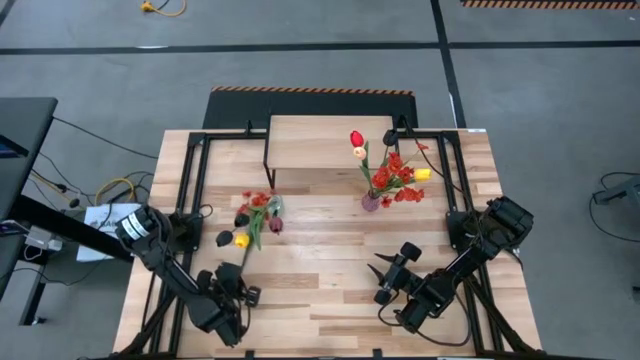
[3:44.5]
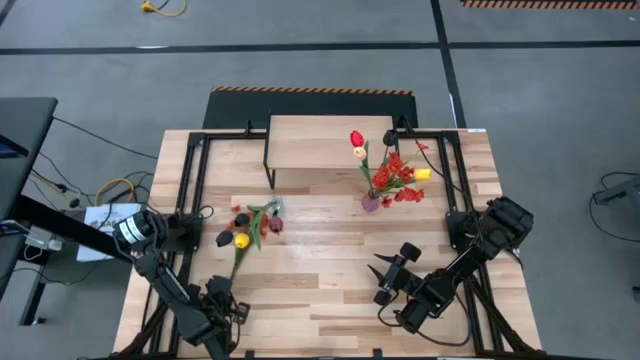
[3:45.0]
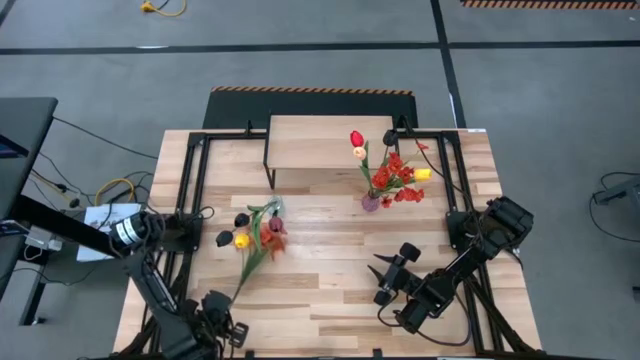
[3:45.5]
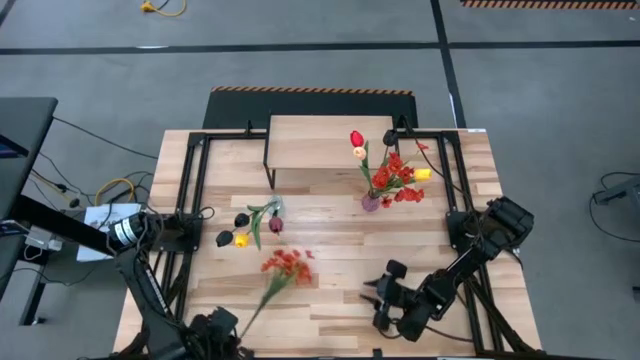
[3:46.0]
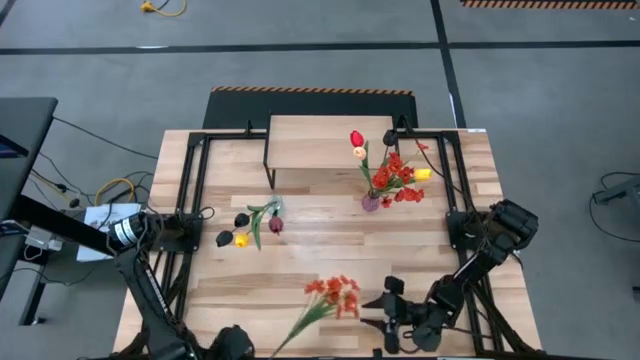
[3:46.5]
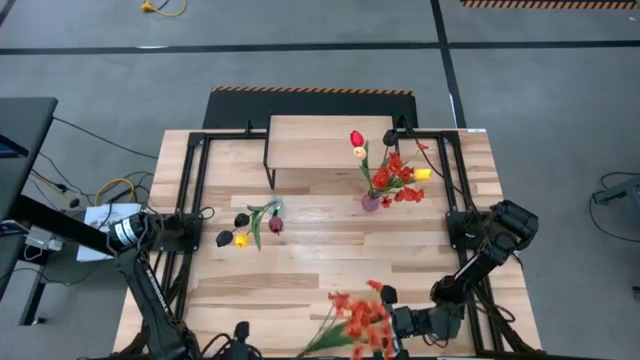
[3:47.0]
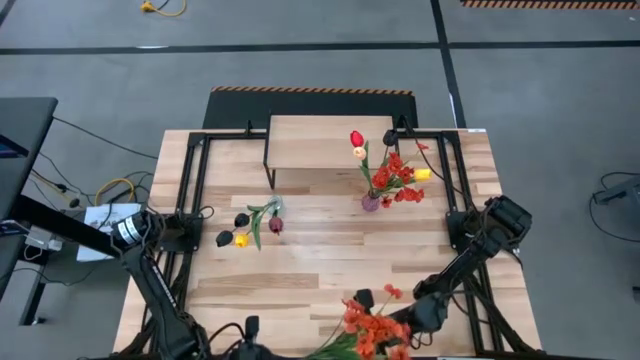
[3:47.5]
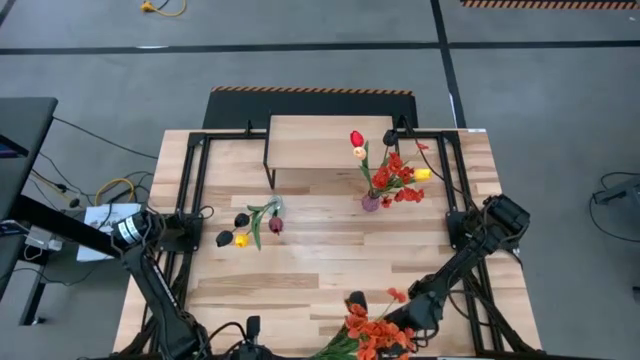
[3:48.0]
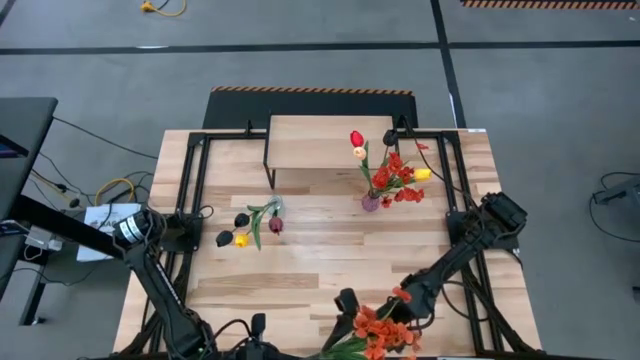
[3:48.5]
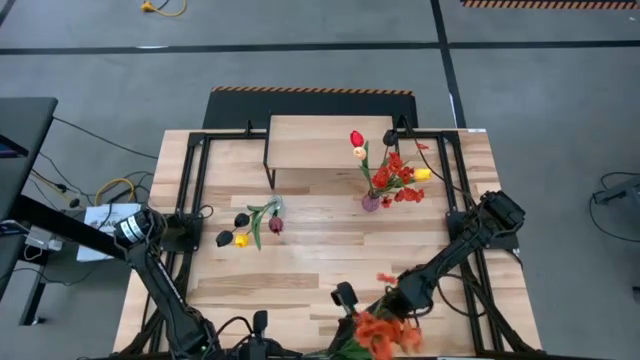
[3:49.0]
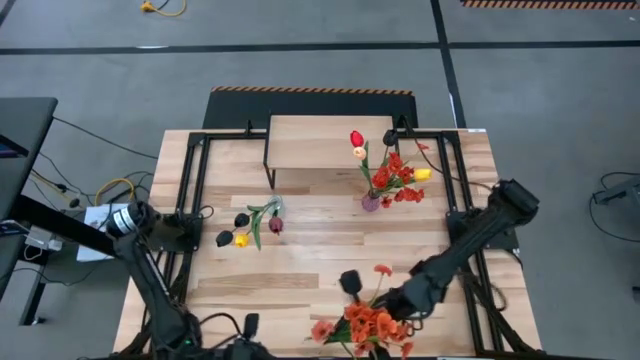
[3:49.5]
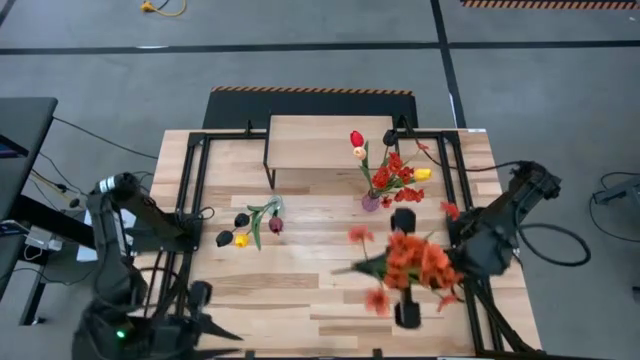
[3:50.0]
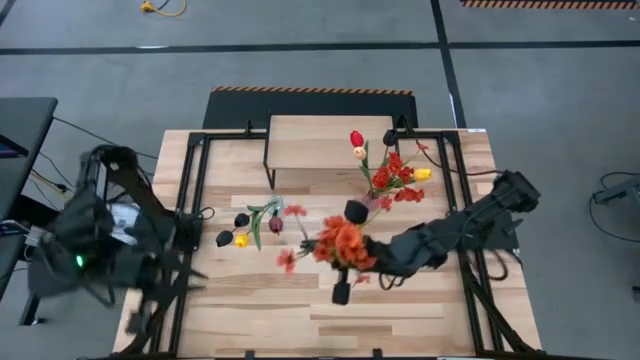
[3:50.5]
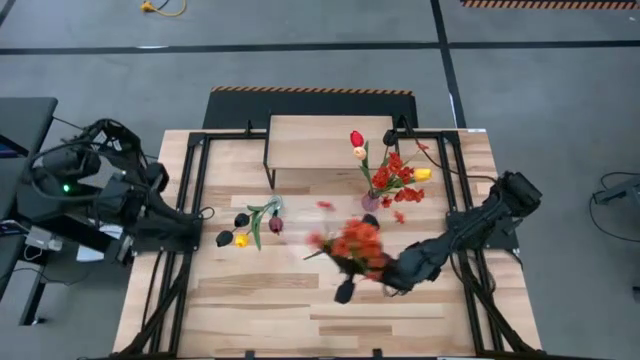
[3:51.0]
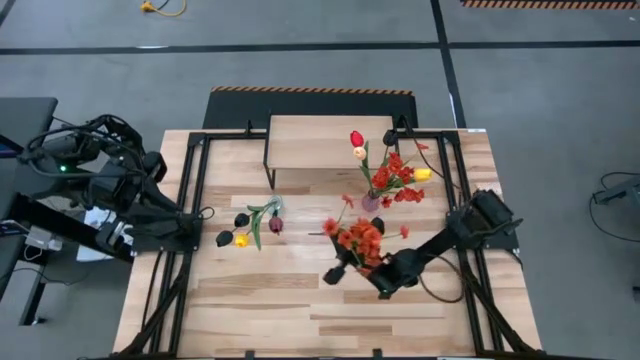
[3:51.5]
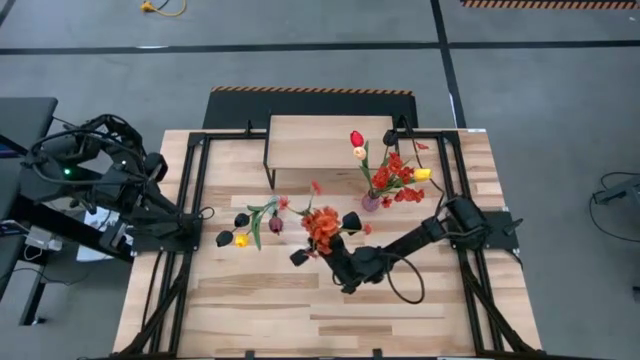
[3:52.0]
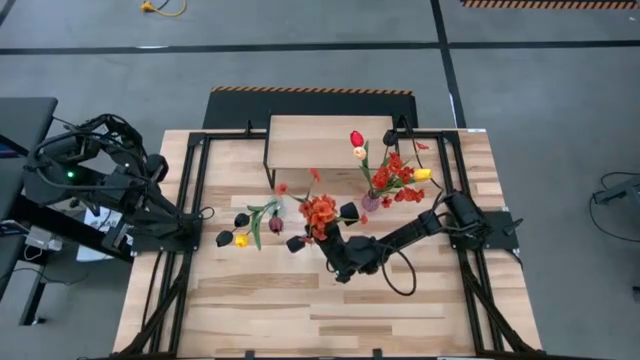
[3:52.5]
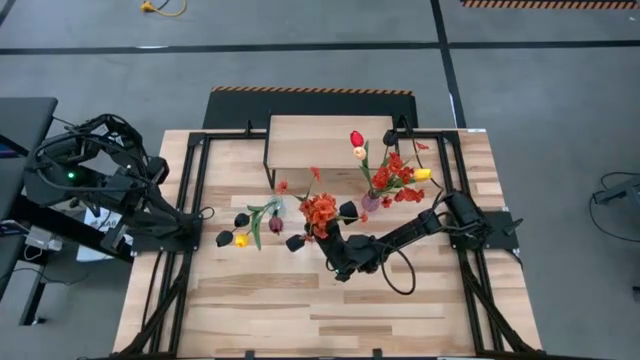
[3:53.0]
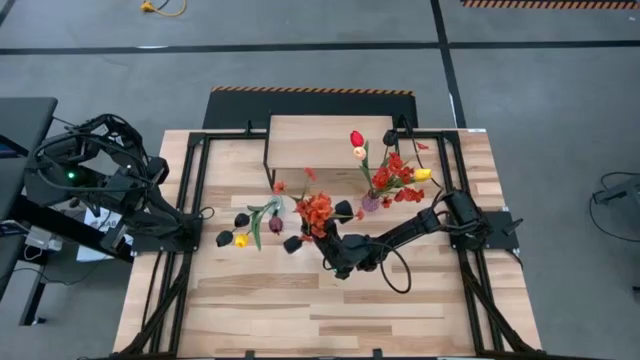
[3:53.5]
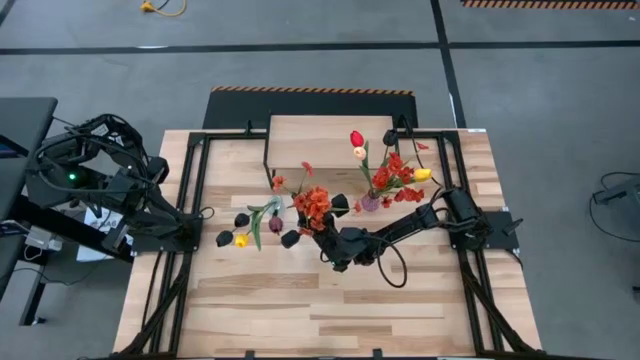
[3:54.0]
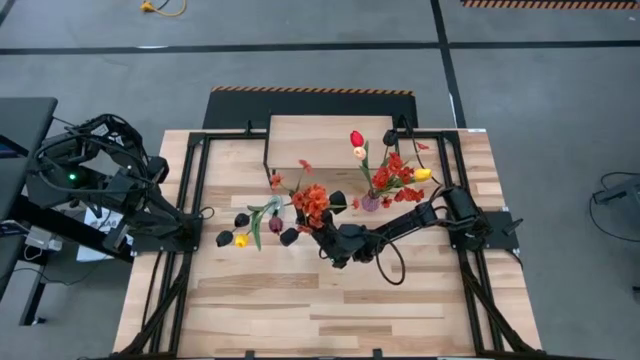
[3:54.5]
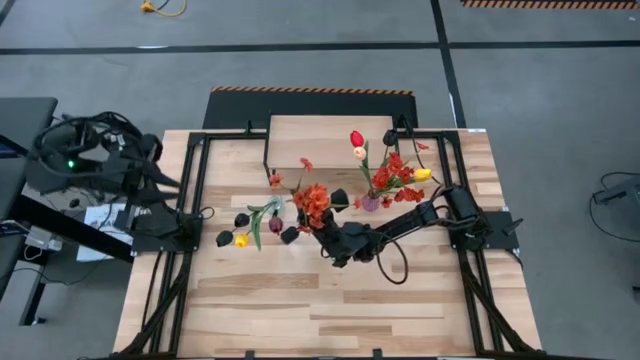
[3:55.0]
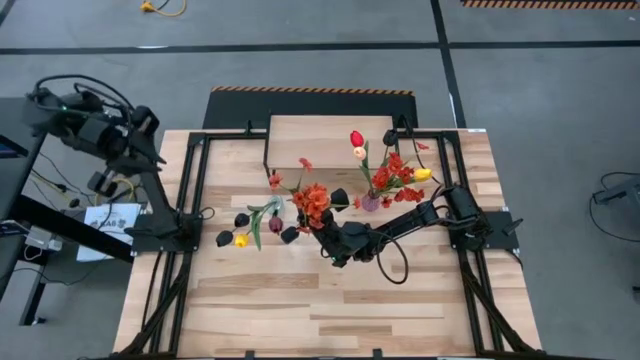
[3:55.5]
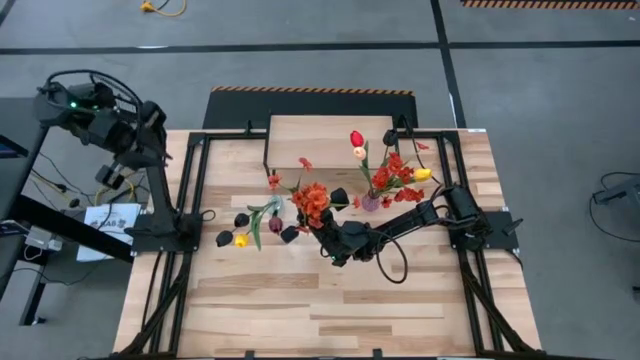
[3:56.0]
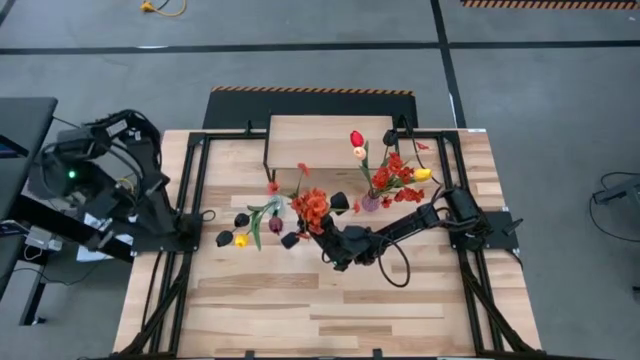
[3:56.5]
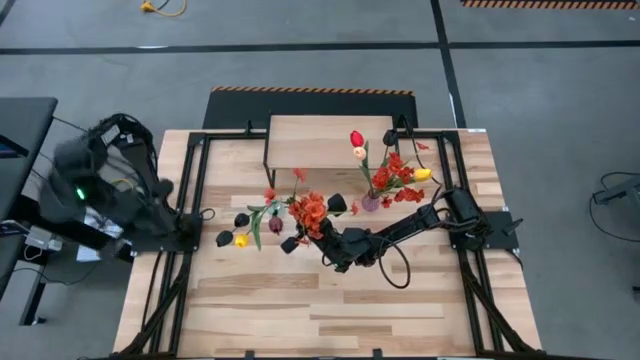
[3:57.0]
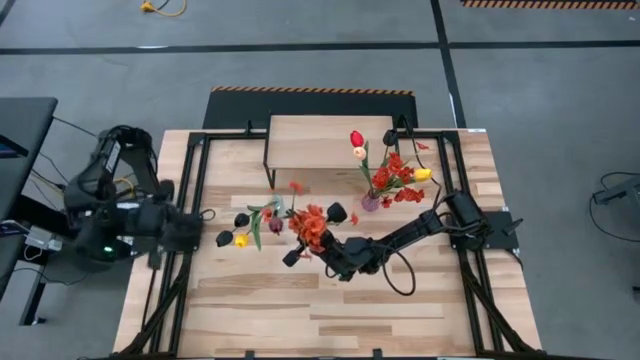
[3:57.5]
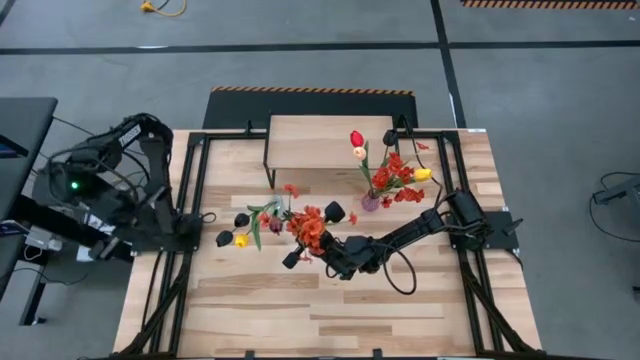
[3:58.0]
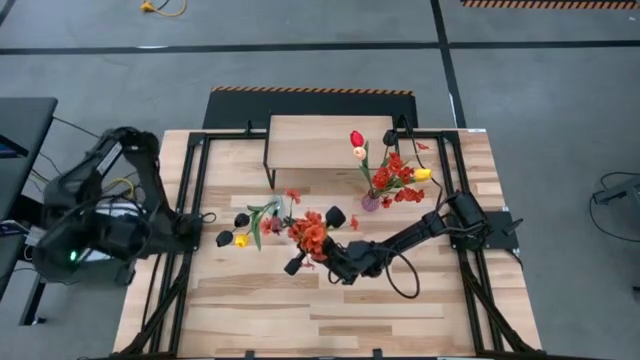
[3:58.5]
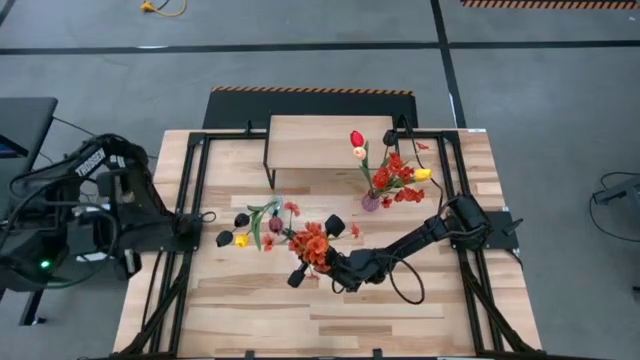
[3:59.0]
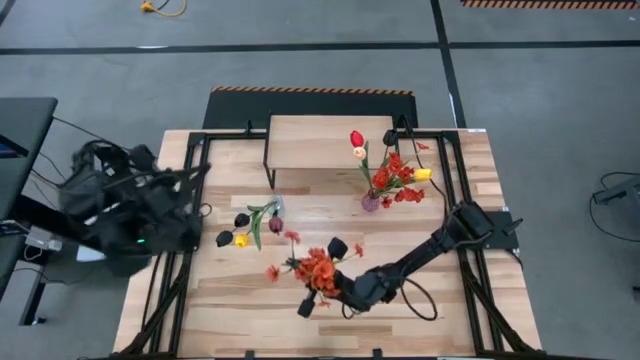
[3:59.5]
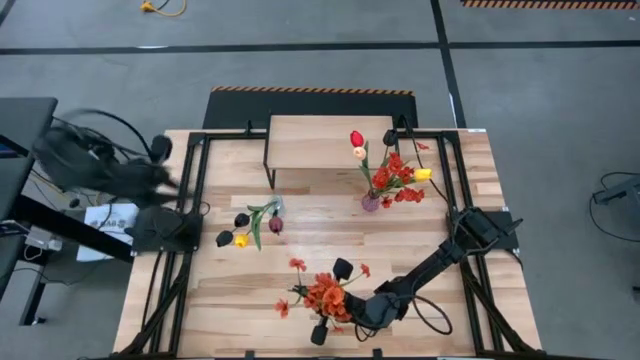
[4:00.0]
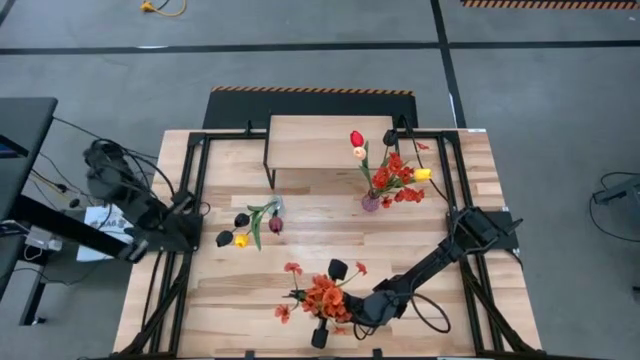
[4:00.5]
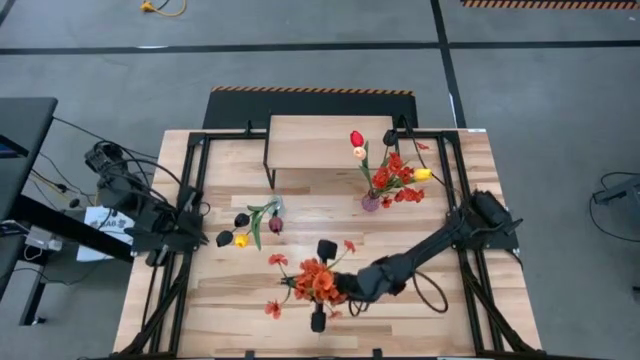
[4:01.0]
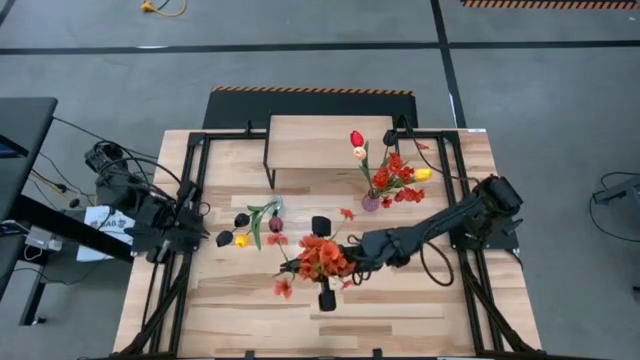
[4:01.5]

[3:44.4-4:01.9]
Task: Pick and place flowers into a vace then onto a shelf
Put the red flower into the transparent vase

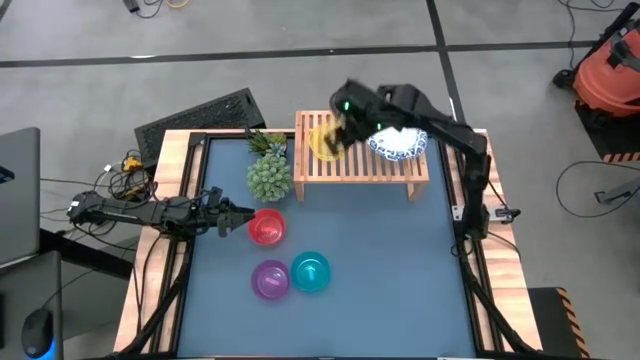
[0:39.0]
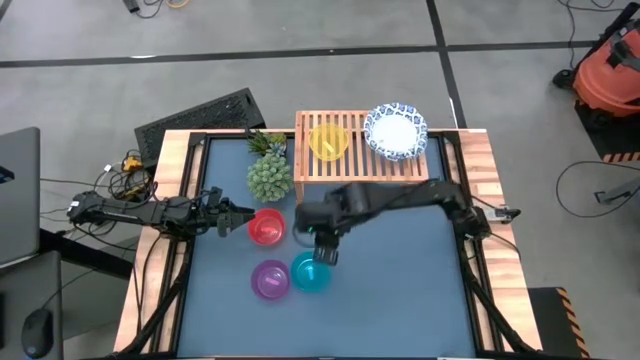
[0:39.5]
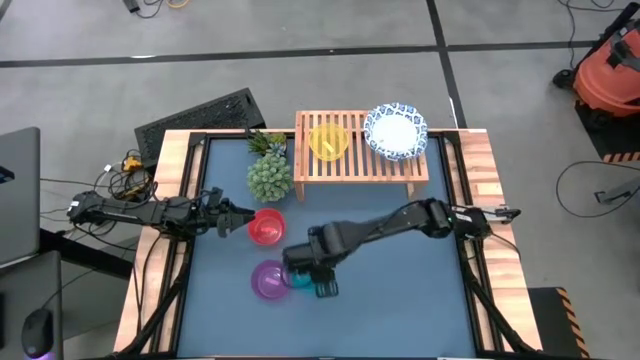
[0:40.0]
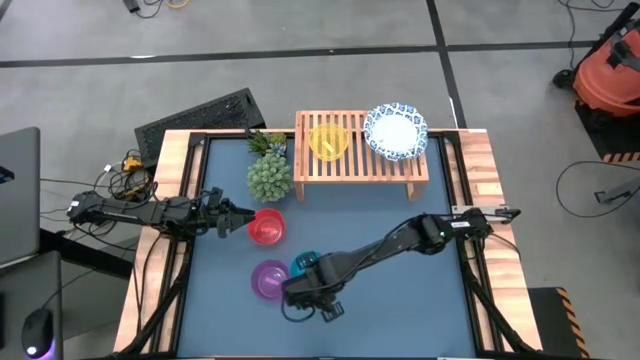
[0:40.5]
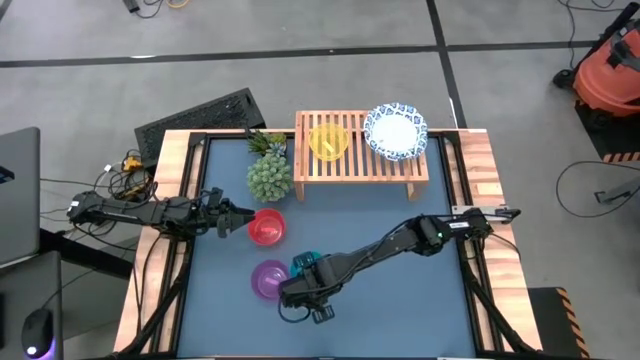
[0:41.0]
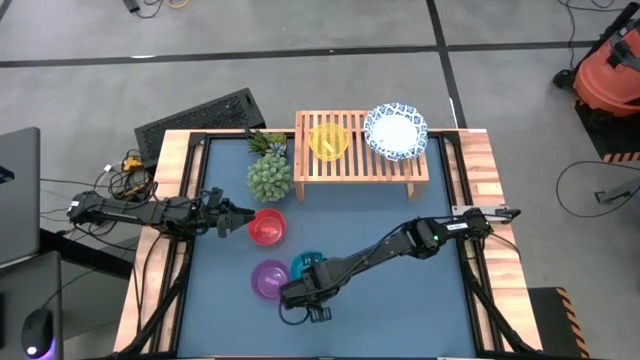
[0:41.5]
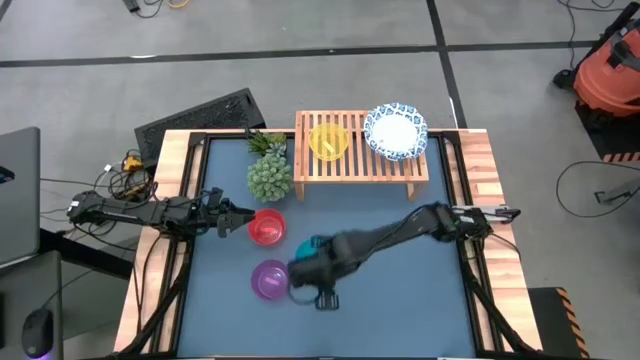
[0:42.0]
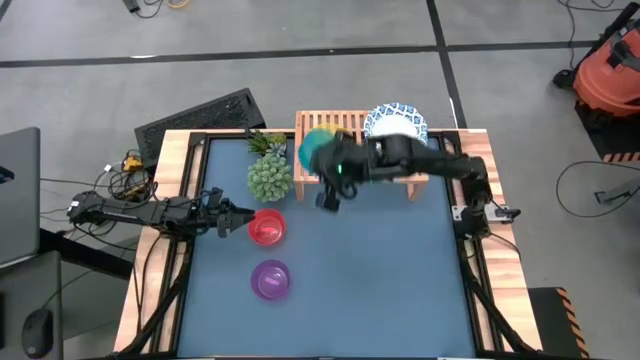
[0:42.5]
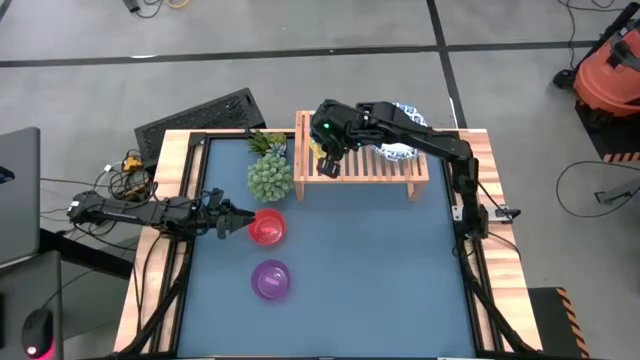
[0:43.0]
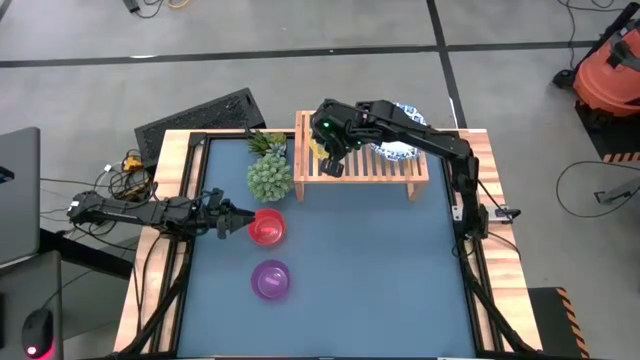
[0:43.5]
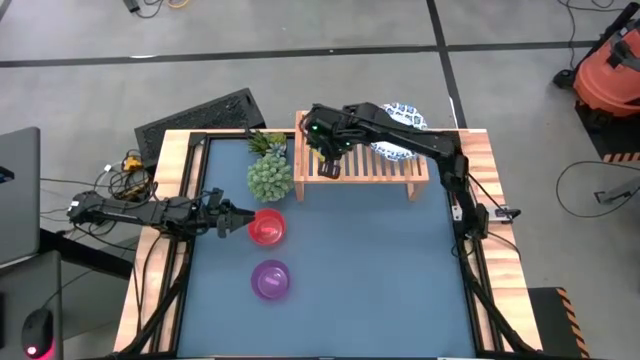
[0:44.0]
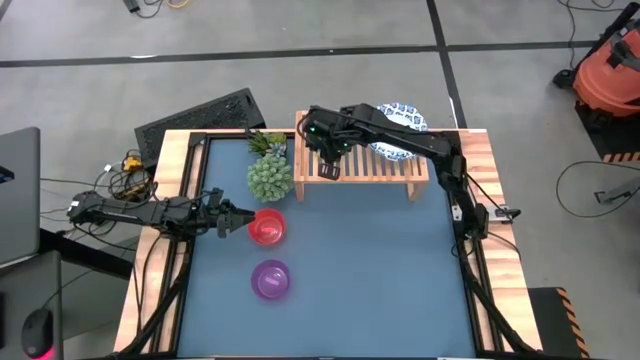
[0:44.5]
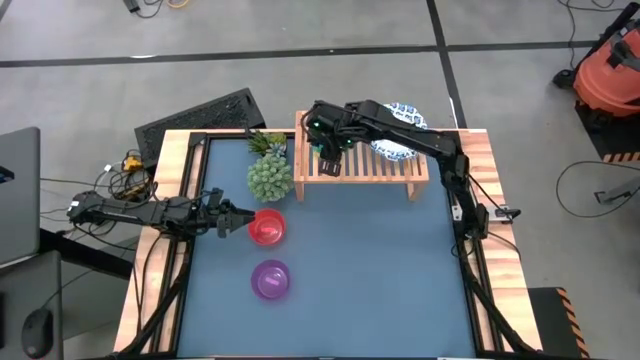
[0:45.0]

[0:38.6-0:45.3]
Task: Place and stack bowls onto a shelf
Stack the blue bowl on top of the yellow bowl on the shelf
